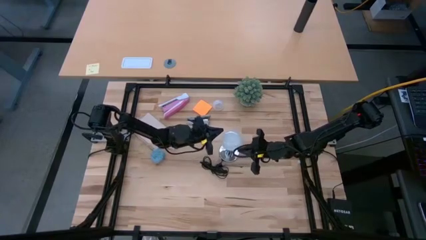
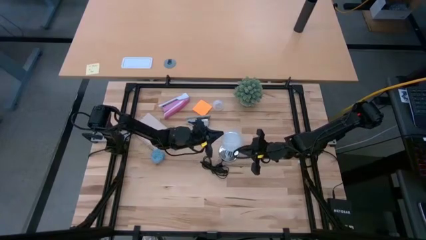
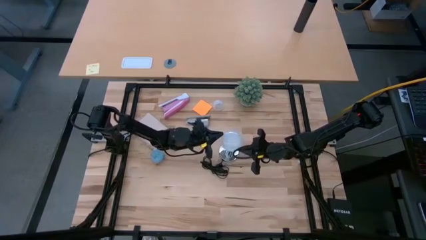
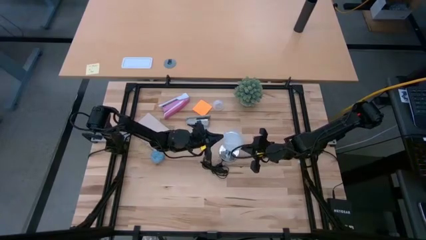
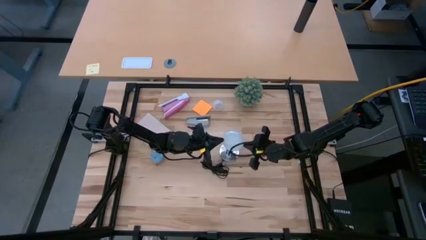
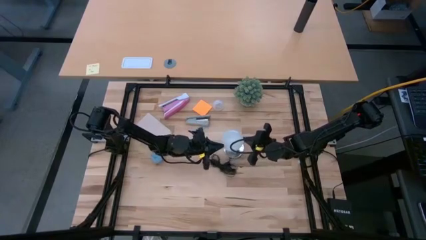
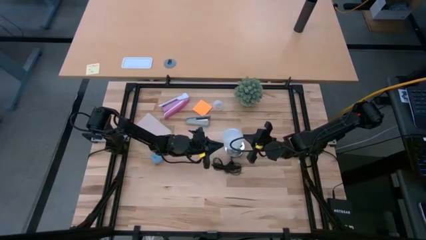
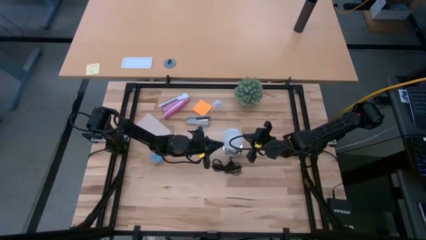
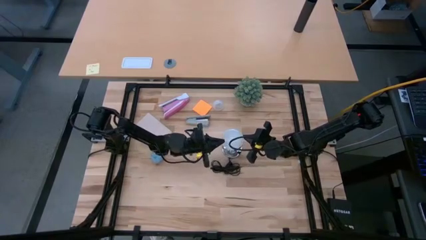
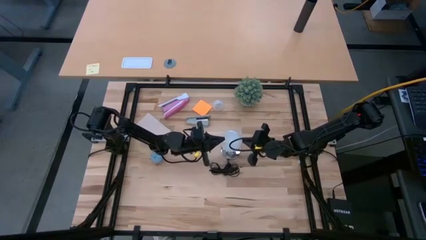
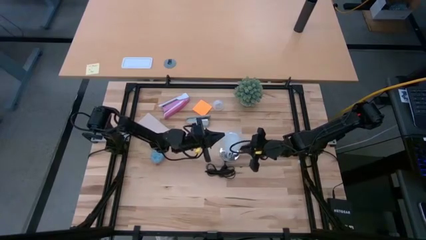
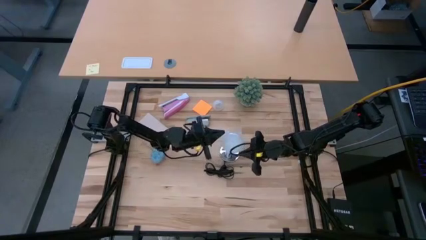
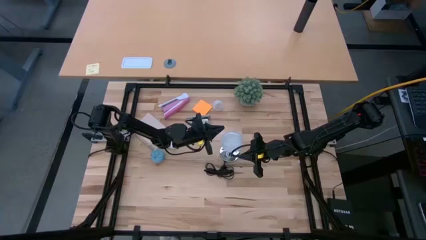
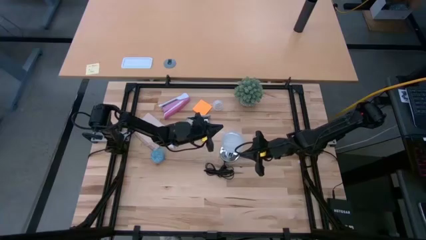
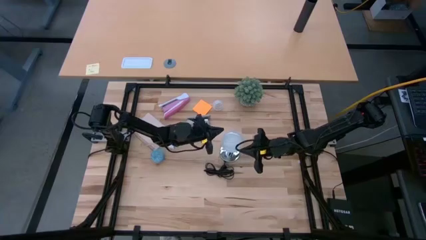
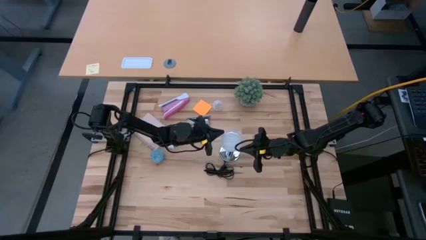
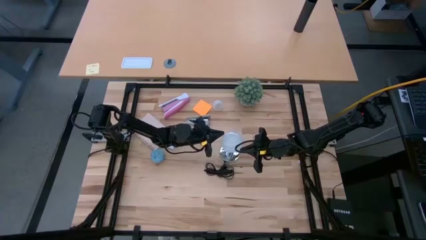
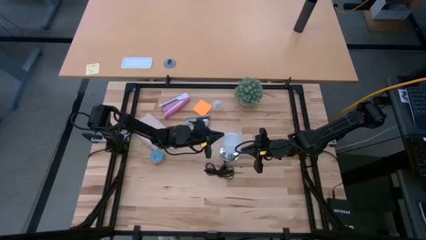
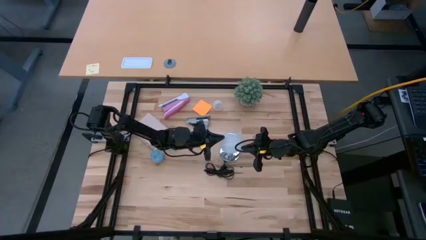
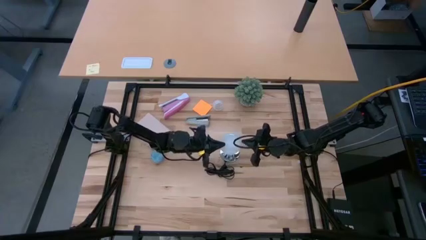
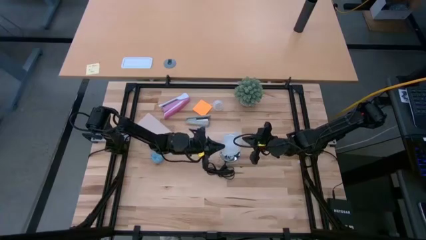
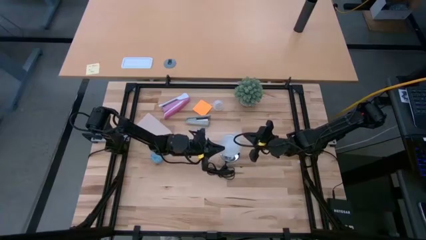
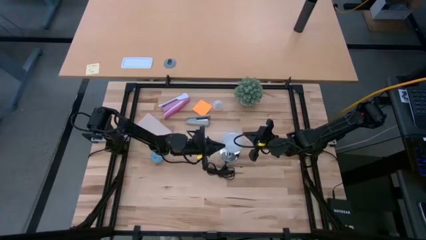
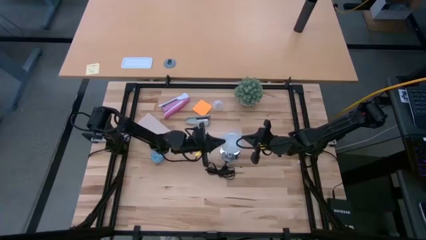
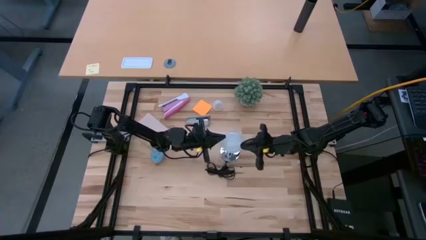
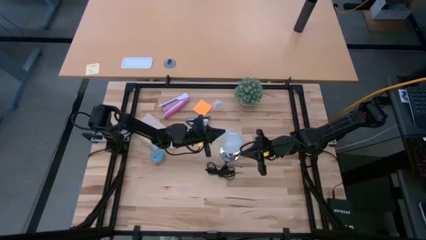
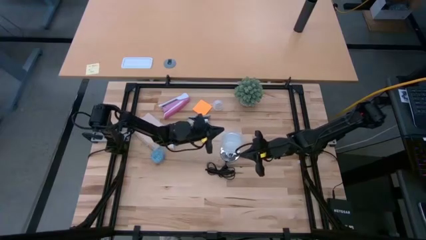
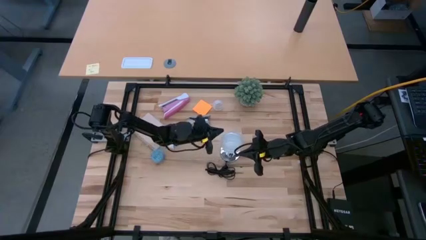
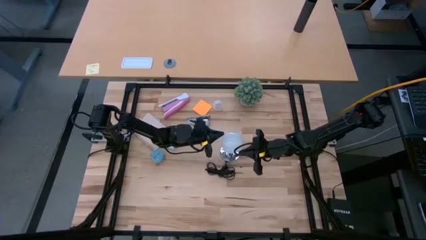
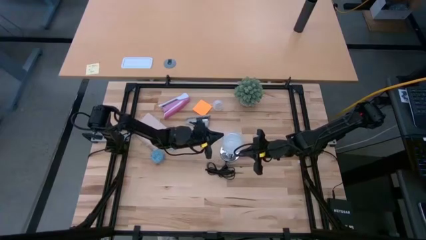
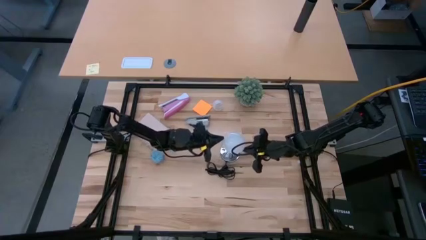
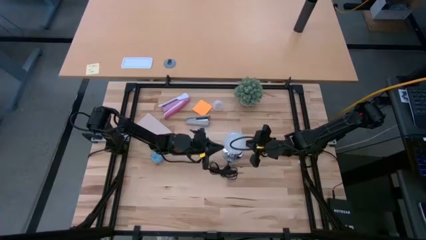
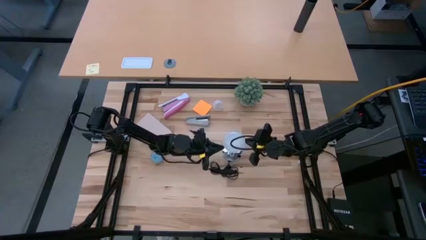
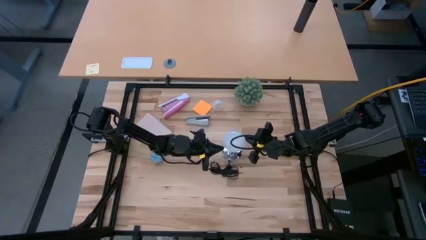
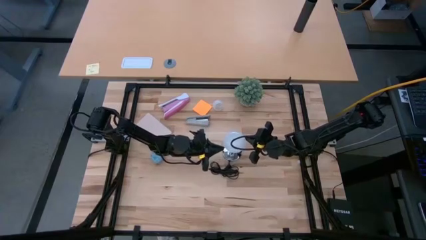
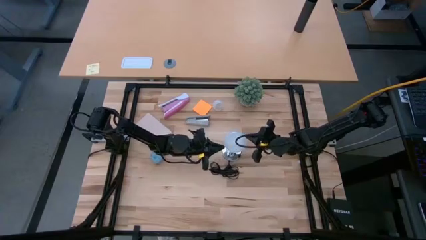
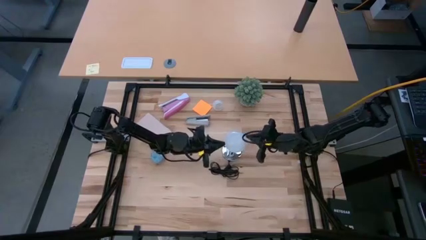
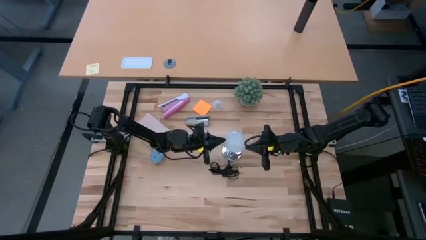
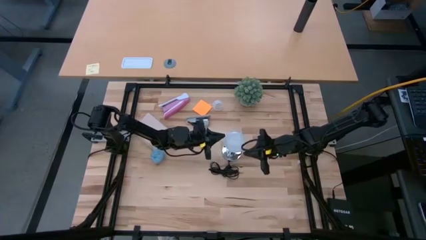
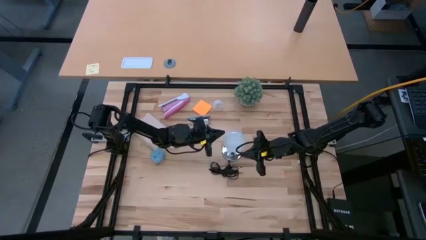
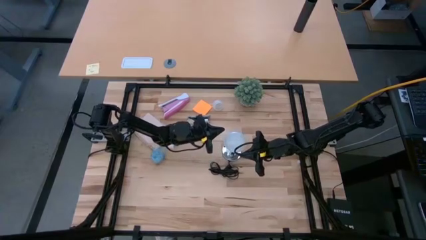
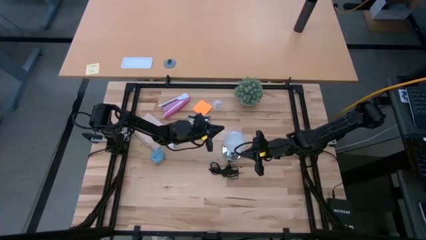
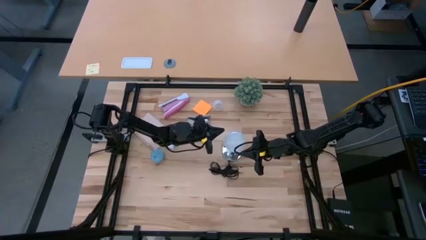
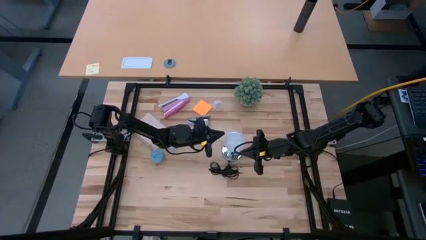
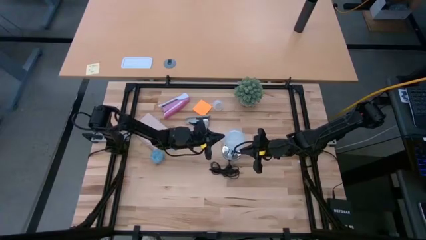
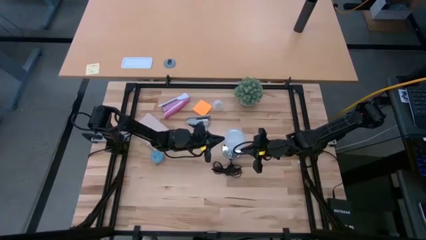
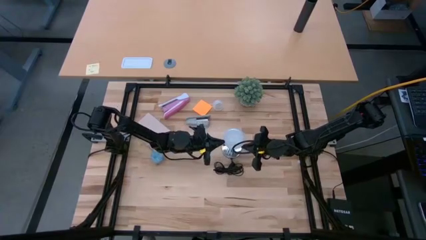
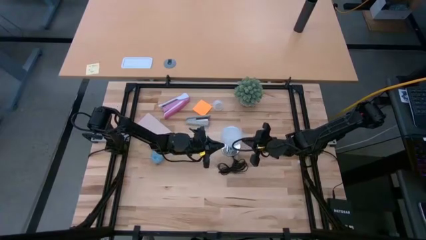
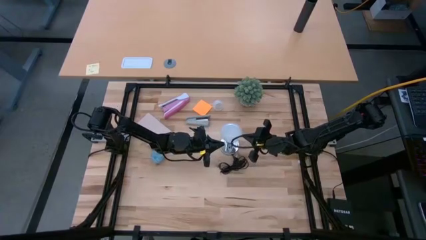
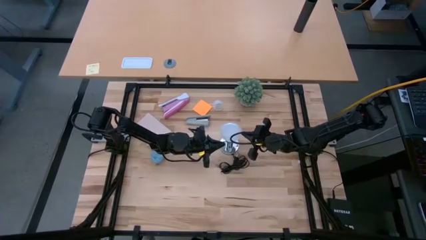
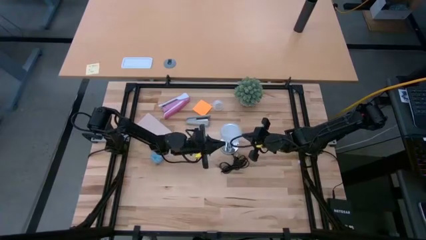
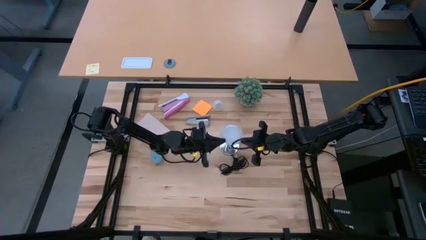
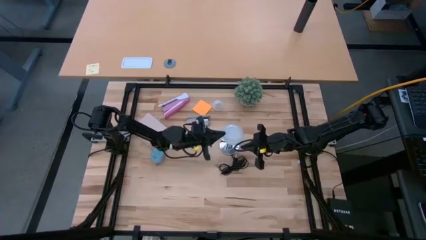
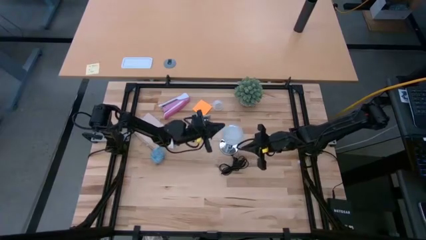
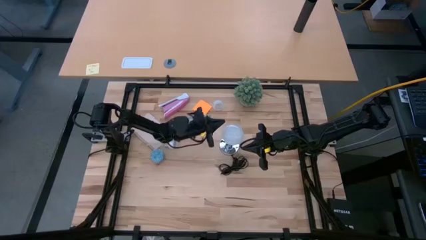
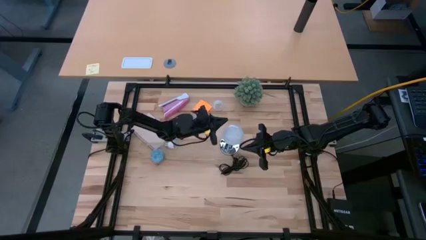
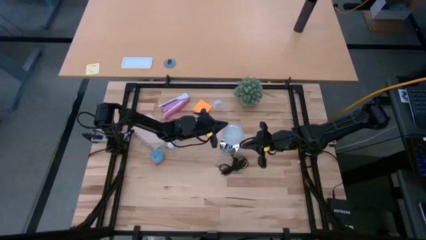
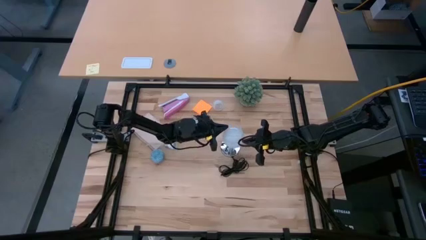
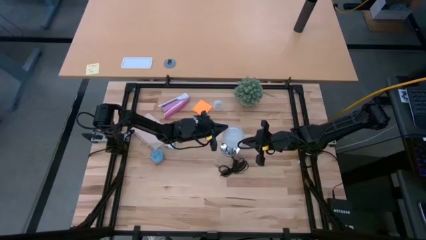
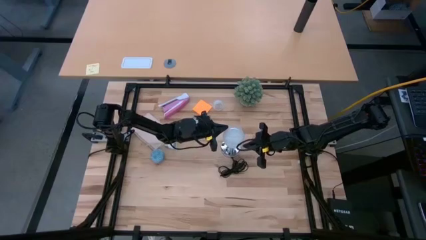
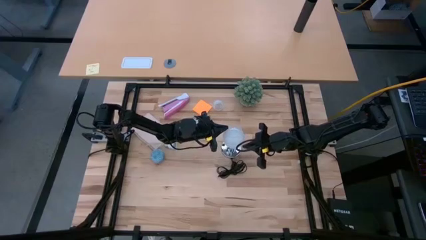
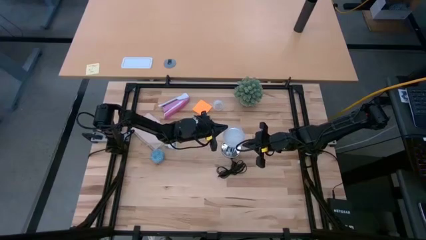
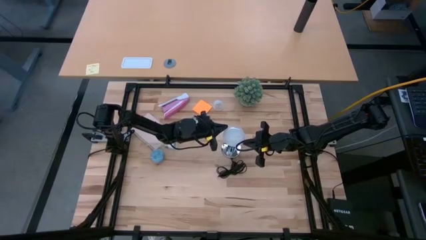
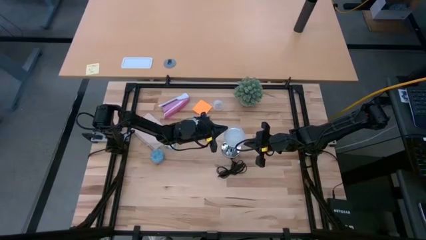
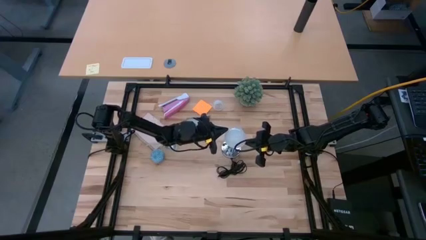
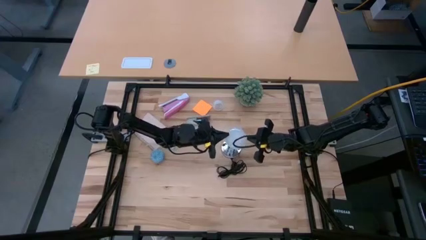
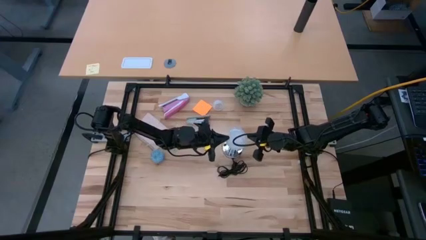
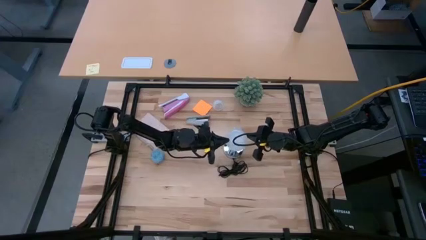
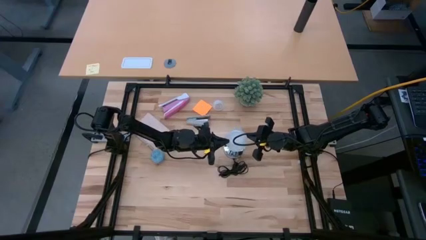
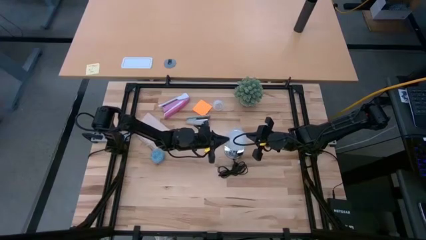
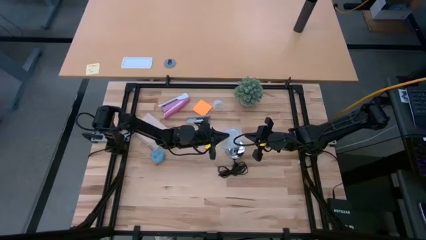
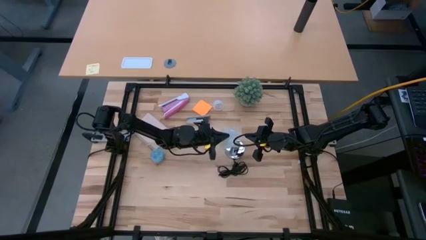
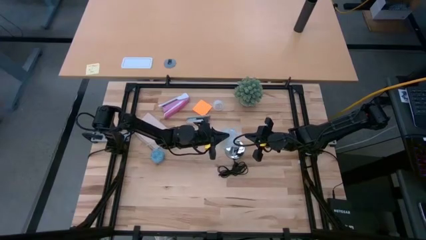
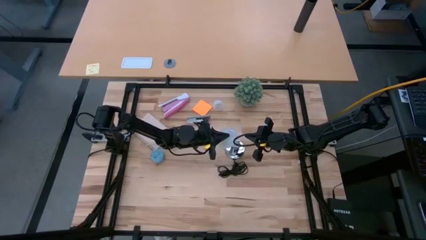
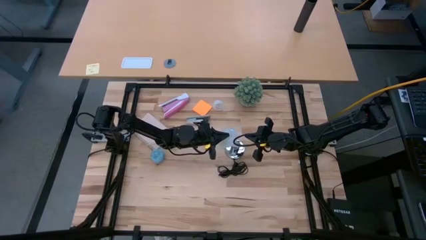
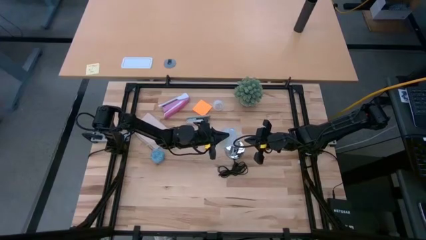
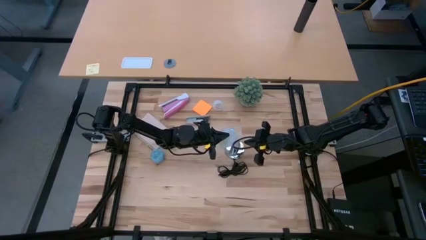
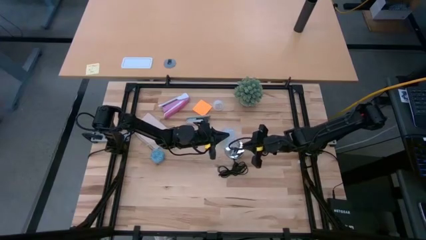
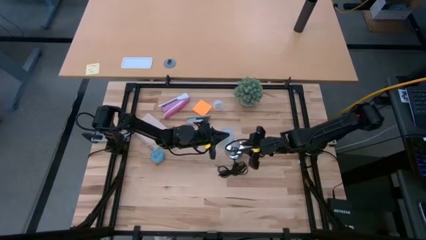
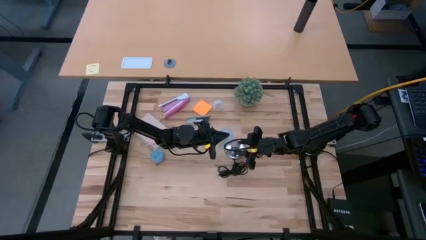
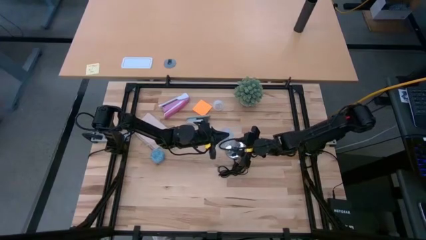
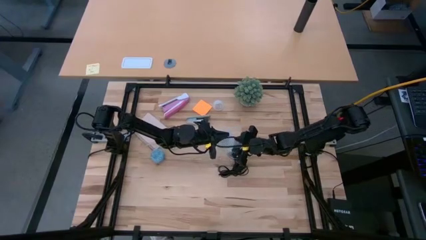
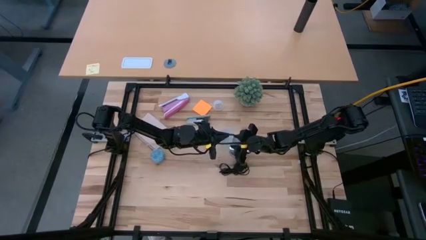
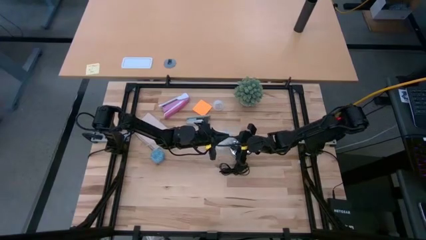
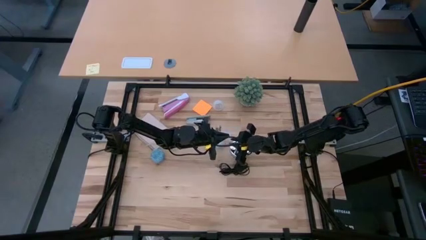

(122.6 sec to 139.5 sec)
Task: Screw lightbulb
Remove the lightbulb from the lamp
